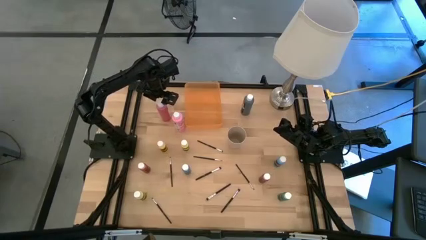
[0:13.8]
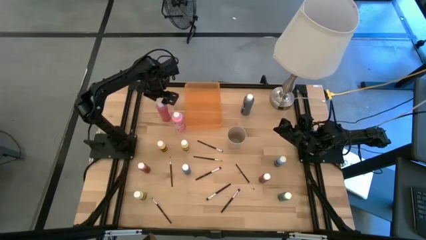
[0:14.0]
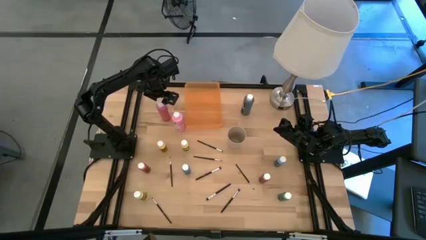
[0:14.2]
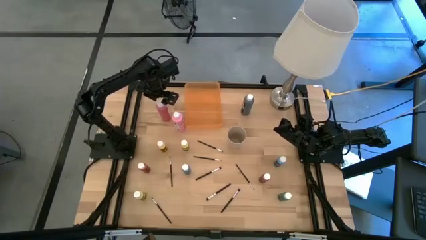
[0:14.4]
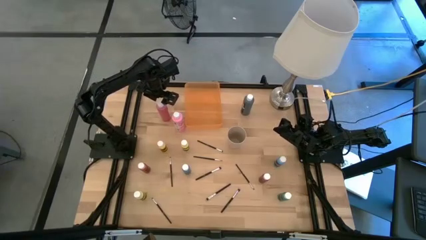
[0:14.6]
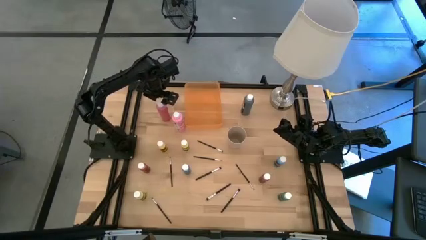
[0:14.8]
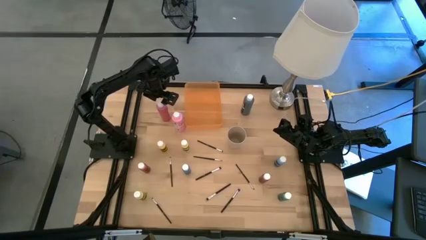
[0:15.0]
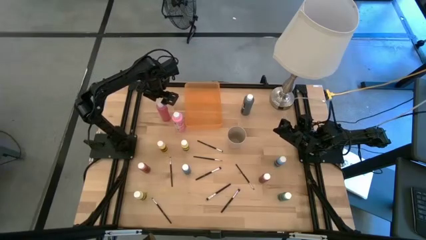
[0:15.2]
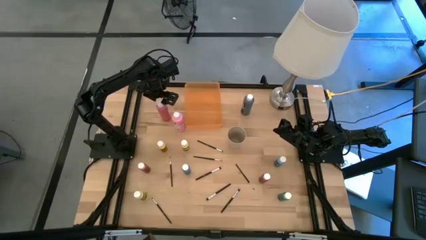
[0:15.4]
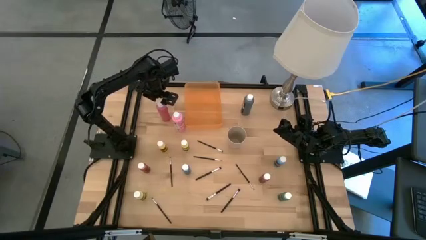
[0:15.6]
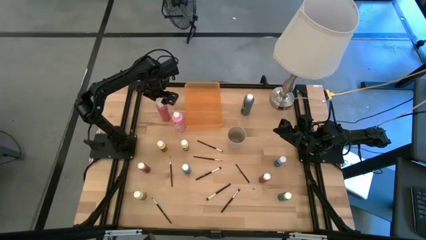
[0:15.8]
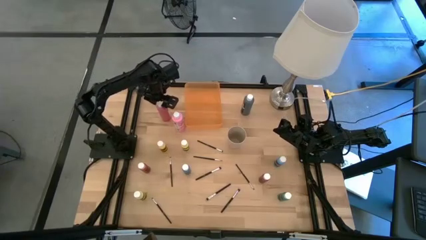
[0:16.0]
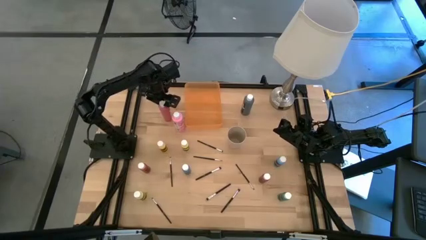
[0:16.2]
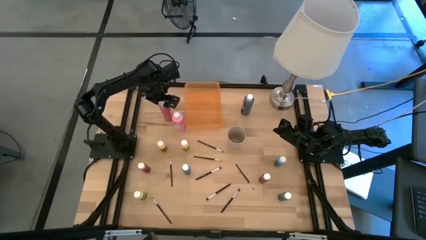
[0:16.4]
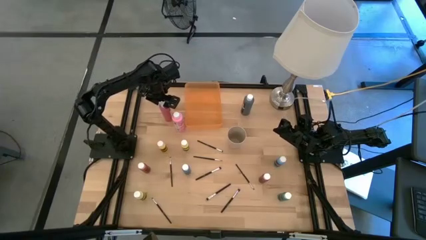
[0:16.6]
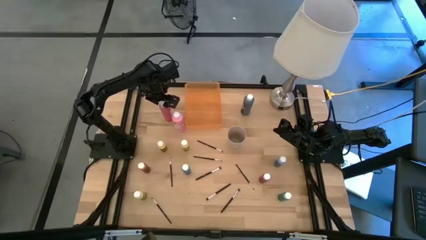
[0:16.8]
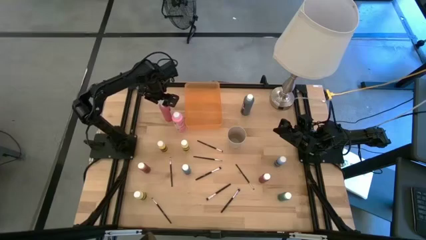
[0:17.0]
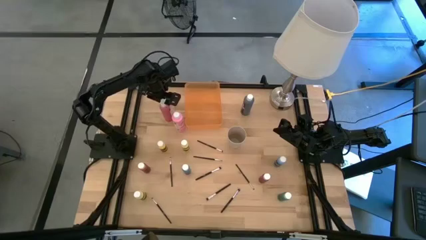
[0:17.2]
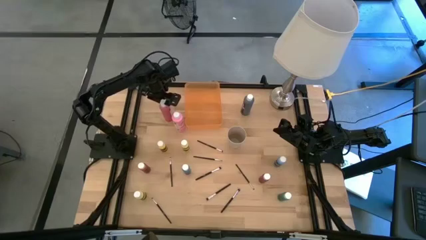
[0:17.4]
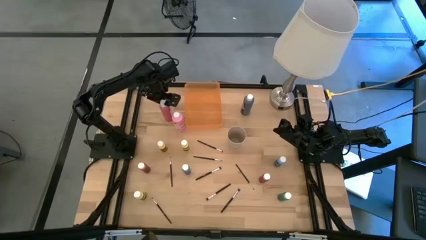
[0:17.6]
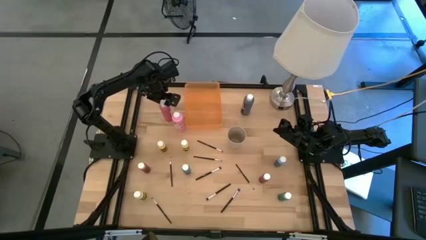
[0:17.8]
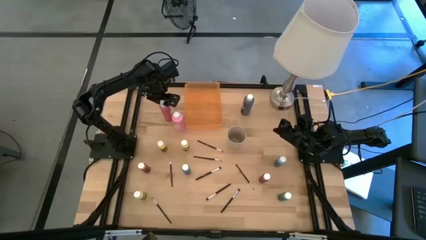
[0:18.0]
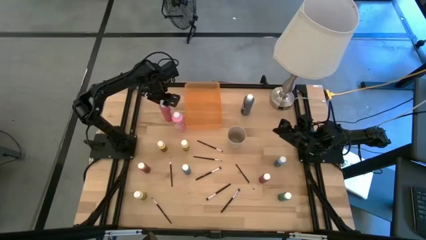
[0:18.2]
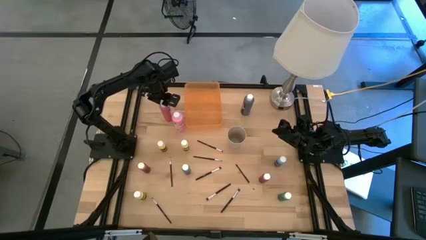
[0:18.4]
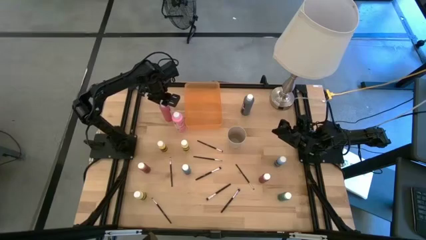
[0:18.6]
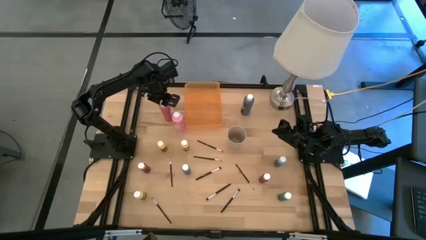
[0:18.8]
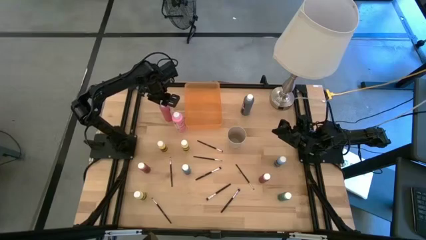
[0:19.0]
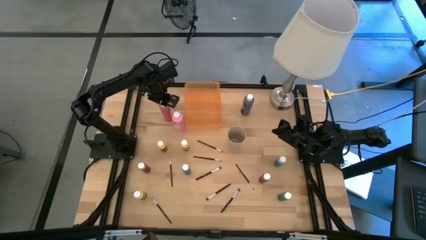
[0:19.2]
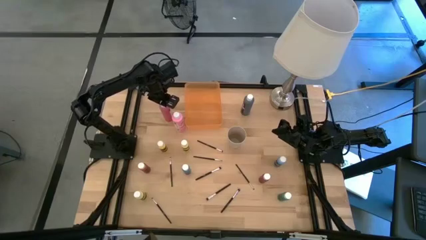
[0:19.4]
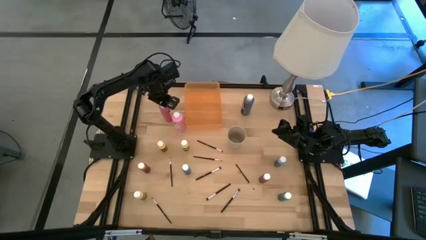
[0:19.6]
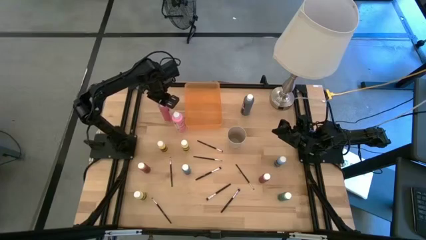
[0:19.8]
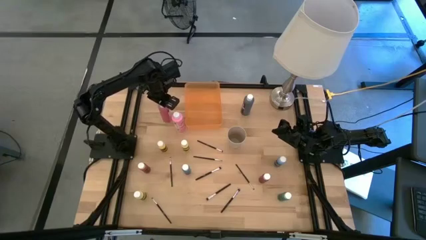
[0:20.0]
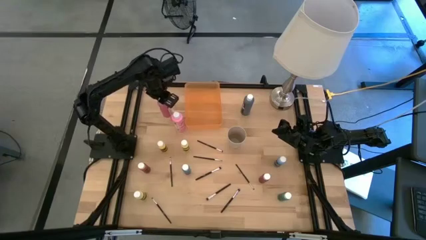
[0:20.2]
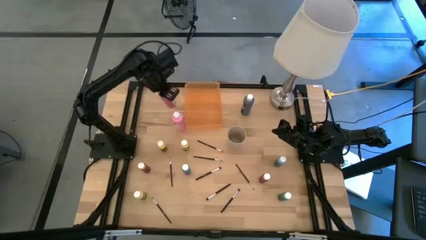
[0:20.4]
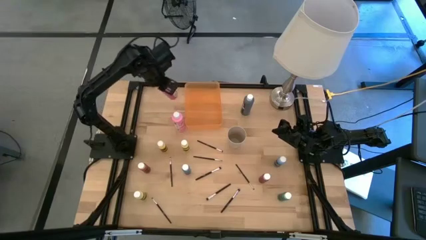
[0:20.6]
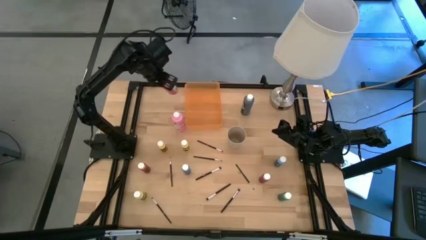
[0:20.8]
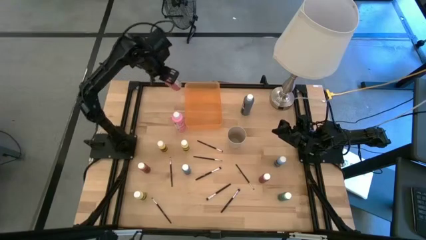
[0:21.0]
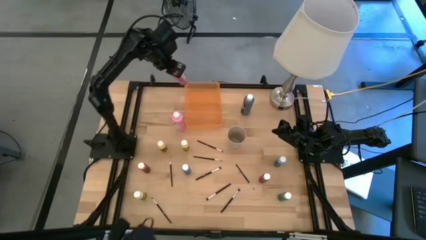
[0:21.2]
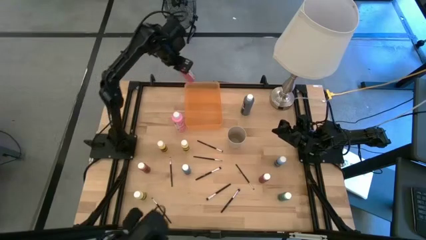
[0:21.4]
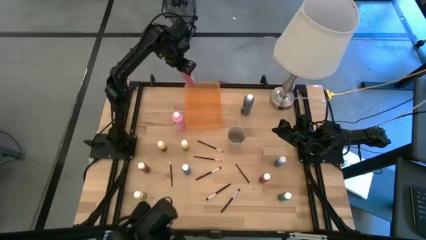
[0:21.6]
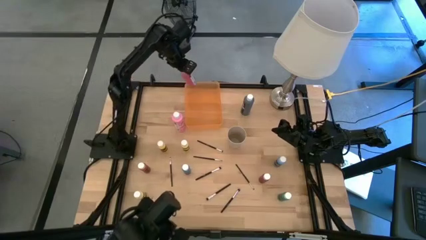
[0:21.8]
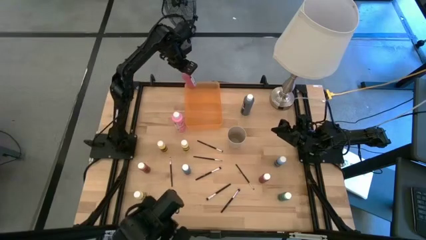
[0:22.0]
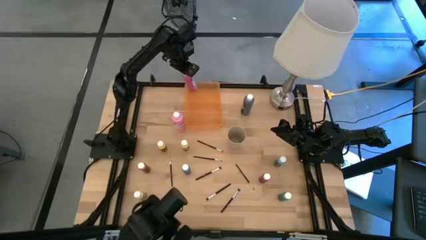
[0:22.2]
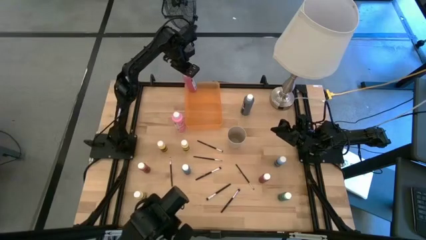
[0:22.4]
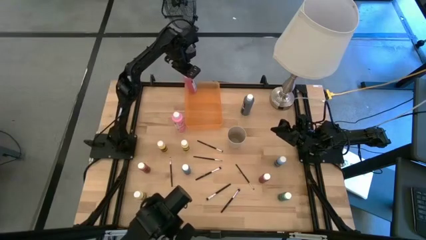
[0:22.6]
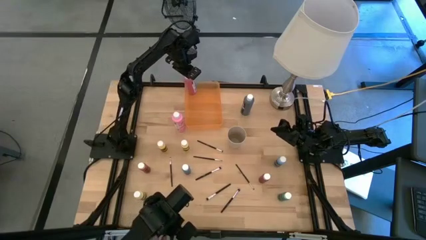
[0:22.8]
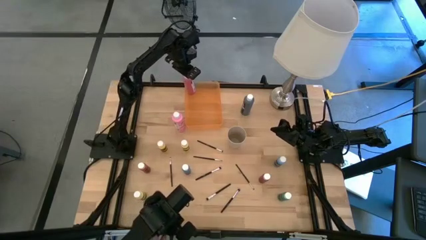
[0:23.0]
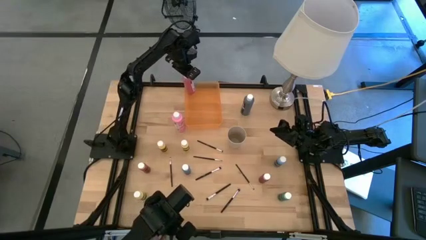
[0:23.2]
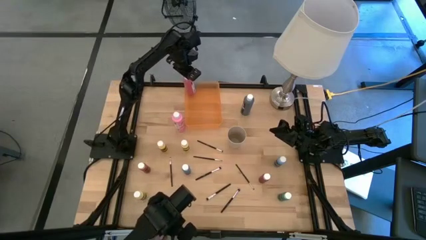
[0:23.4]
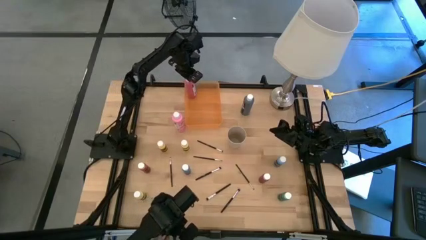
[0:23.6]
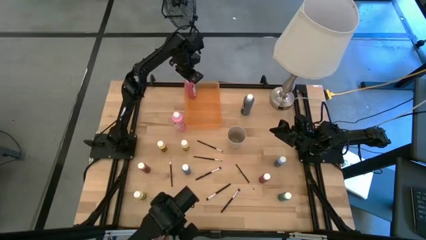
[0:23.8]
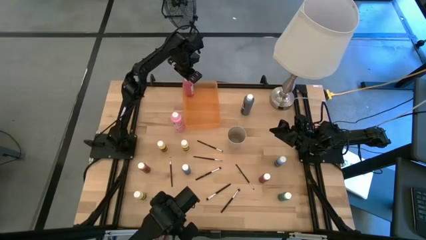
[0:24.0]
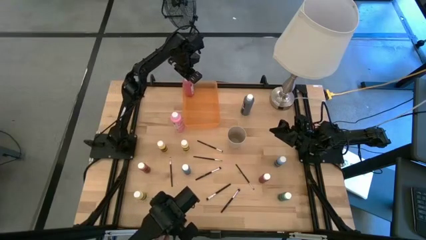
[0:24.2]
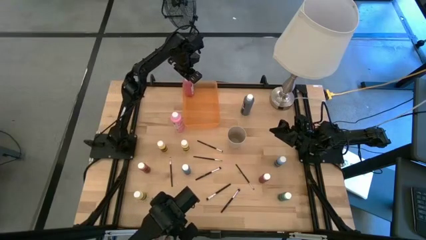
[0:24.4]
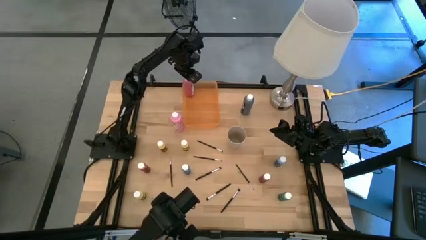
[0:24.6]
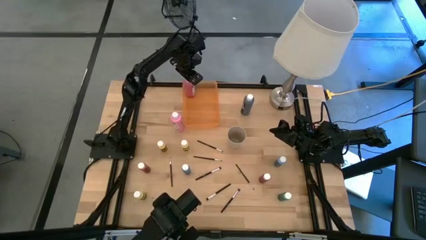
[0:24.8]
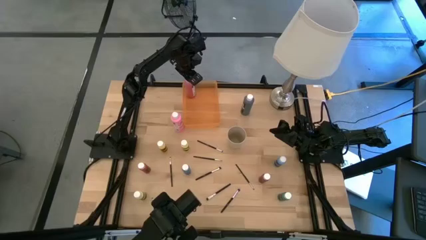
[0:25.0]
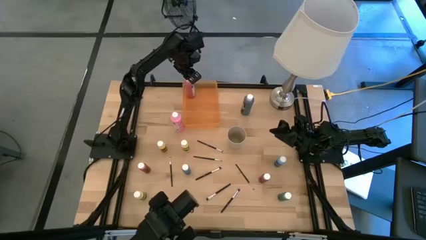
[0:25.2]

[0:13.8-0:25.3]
Task: Pick & Place Paint Supplies
Put the large red paint bottle into the orange bin

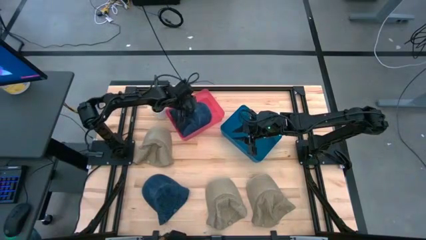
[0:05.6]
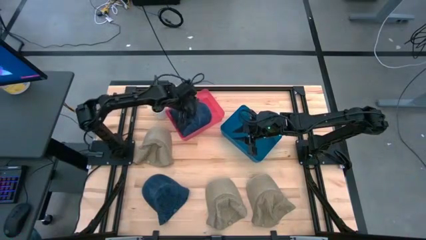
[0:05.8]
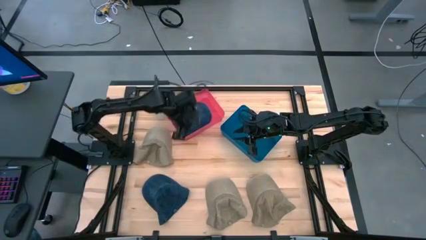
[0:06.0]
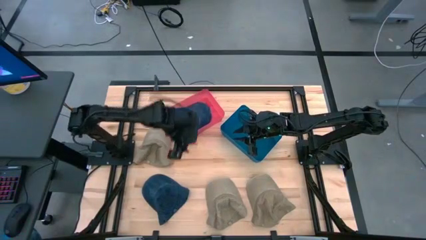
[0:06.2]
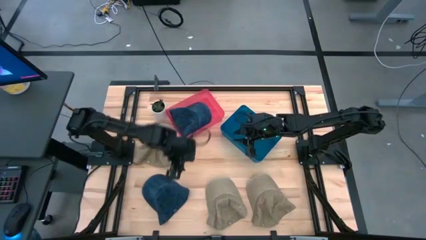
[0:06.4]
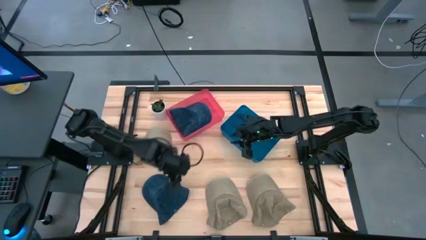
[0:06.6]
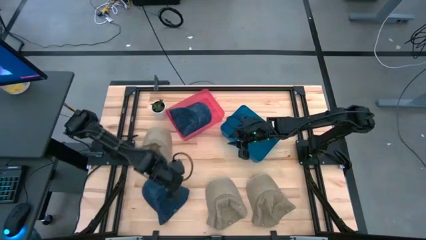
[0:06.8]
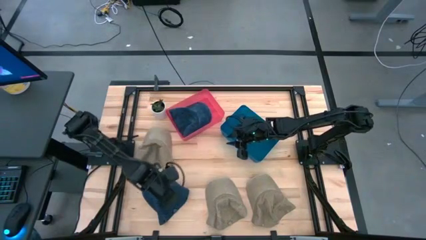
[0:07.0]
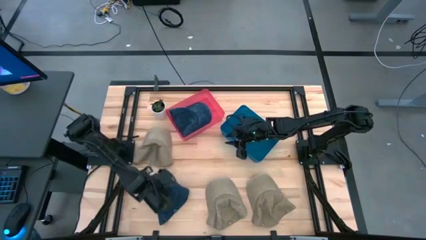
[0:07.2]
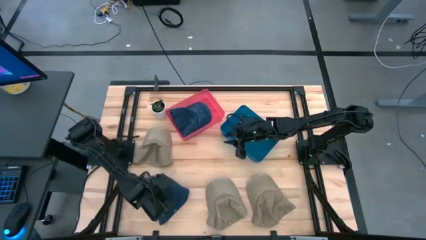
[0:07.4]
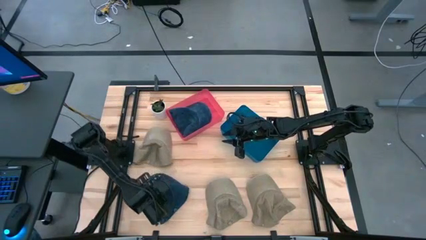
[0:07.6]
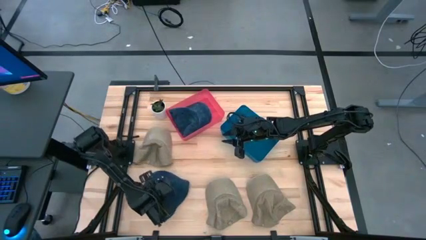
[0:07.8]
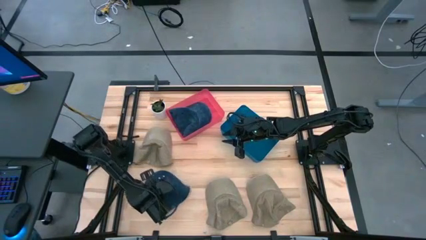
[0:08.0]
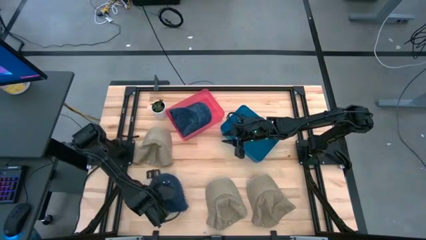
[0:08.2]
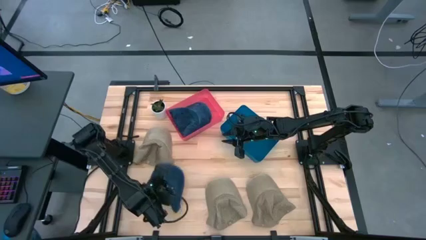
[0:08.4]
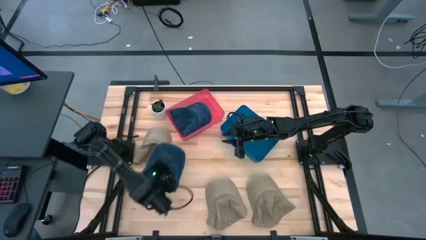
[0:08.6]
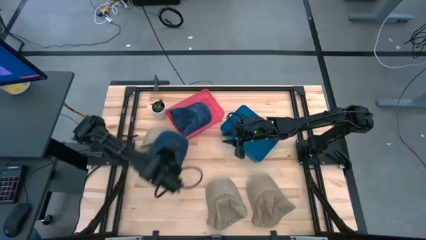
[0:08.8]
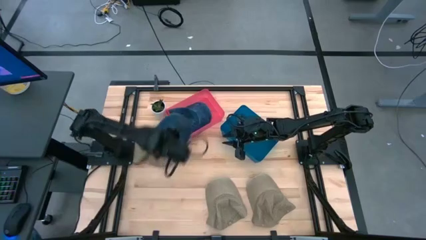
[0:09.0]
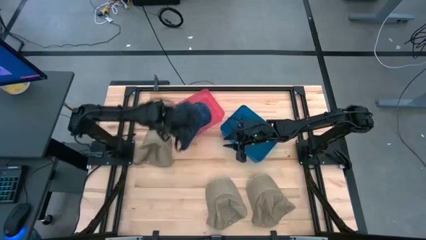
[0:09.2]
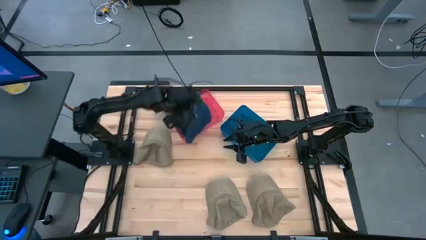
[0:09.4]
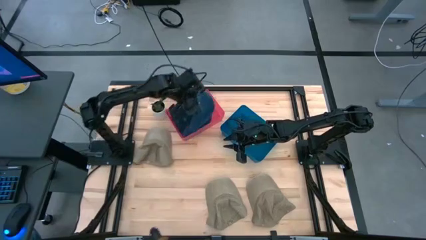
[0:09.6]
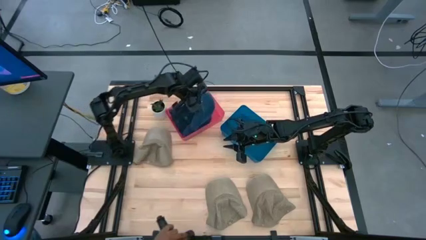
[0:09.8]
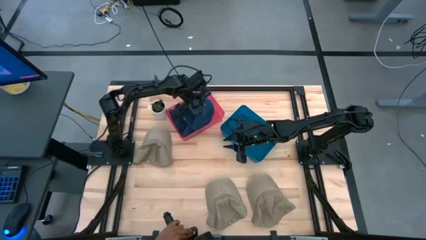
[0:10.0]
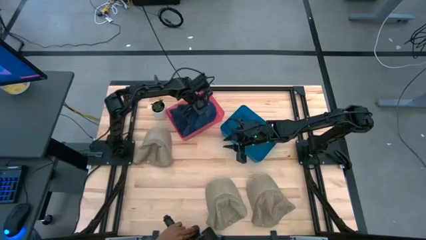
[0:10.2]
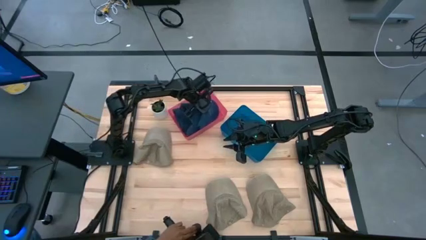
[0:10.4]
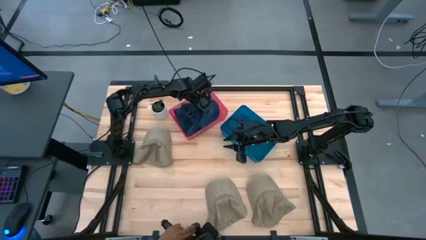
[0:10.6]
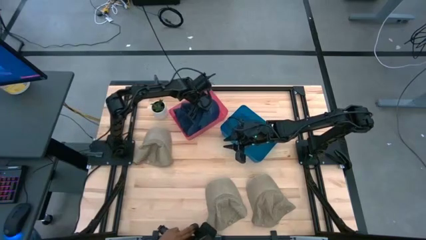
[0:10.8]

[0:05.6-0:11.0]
Task: Pick & Place hat
Put the blue cap into the red bin
